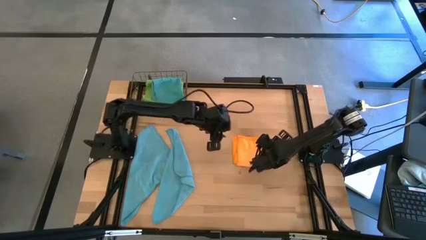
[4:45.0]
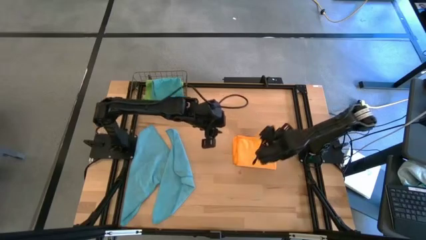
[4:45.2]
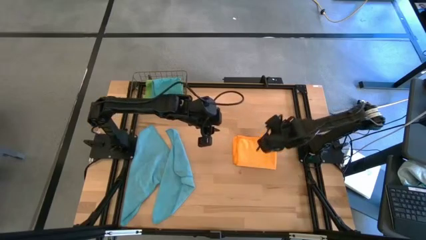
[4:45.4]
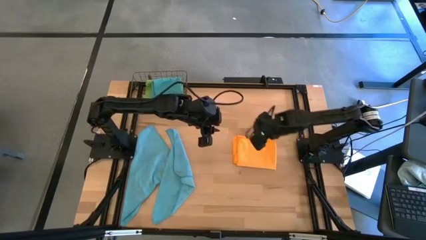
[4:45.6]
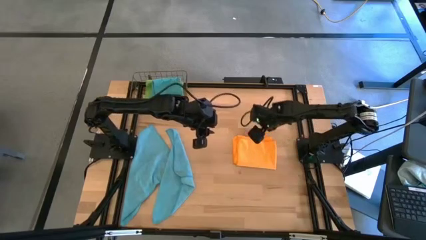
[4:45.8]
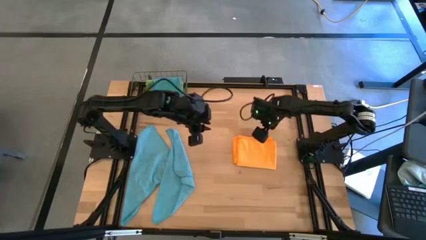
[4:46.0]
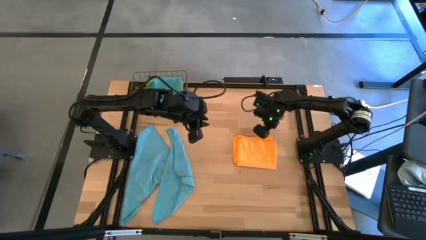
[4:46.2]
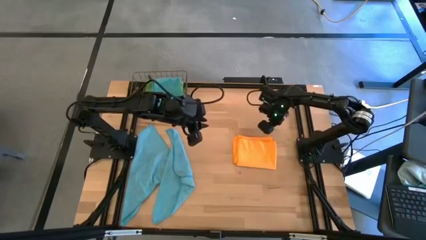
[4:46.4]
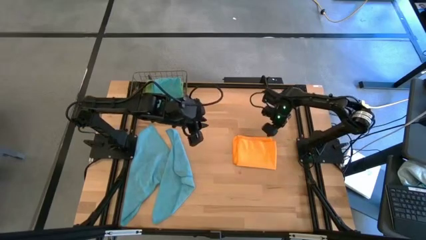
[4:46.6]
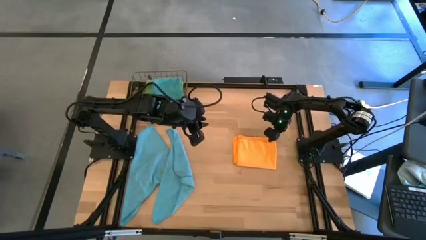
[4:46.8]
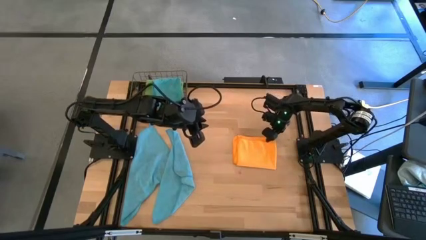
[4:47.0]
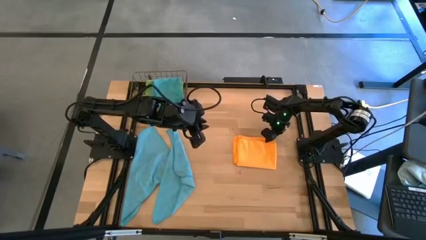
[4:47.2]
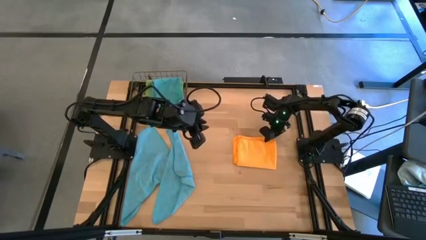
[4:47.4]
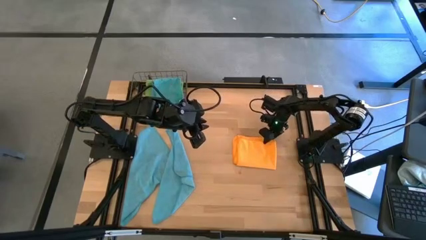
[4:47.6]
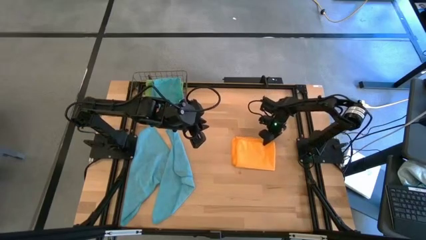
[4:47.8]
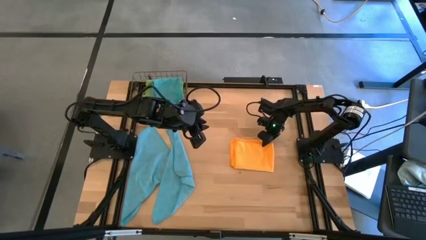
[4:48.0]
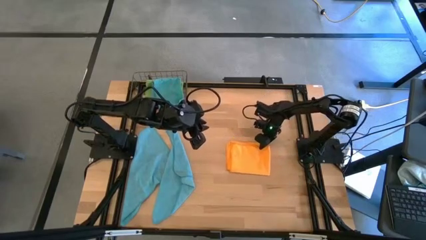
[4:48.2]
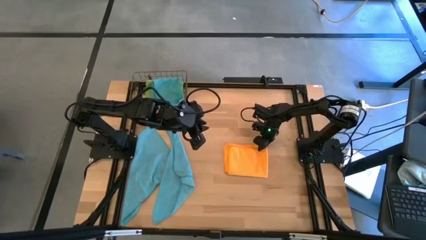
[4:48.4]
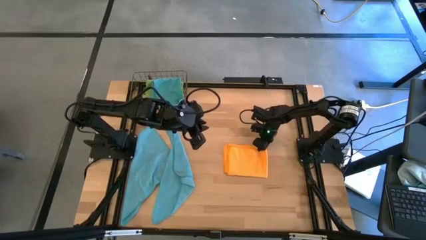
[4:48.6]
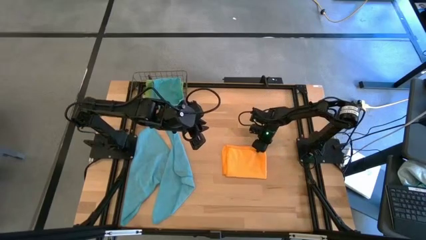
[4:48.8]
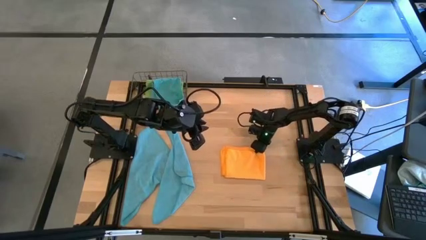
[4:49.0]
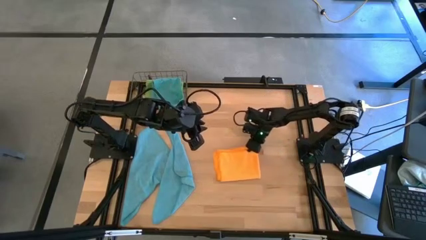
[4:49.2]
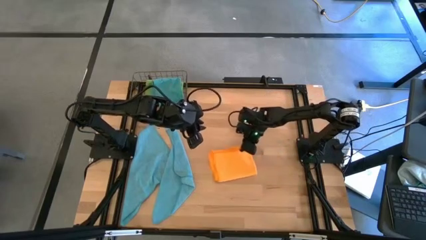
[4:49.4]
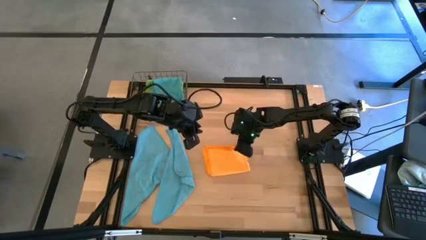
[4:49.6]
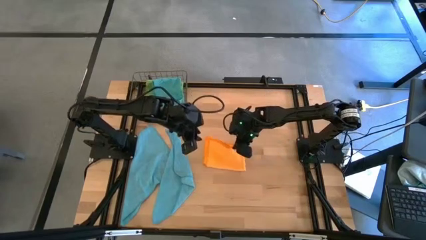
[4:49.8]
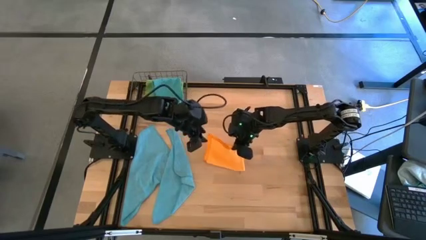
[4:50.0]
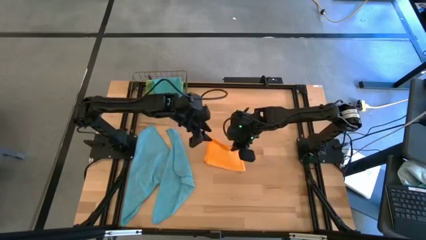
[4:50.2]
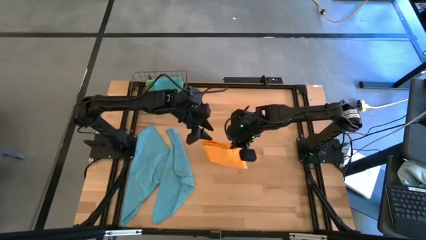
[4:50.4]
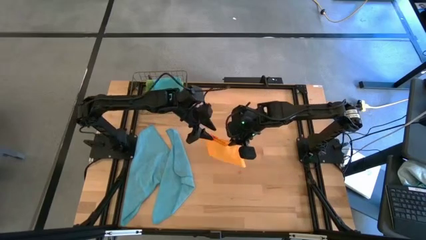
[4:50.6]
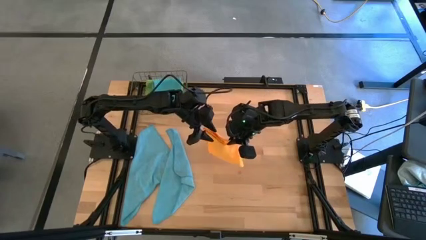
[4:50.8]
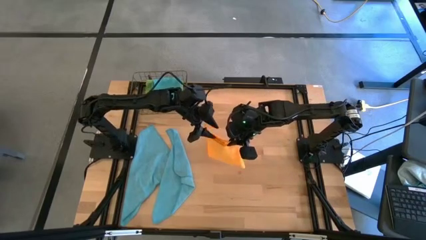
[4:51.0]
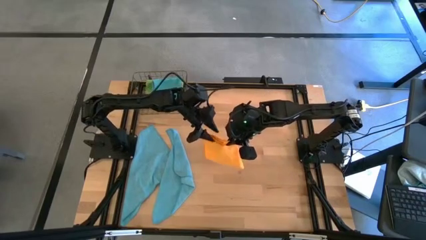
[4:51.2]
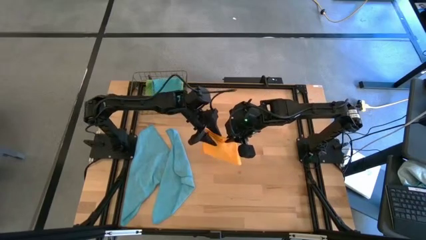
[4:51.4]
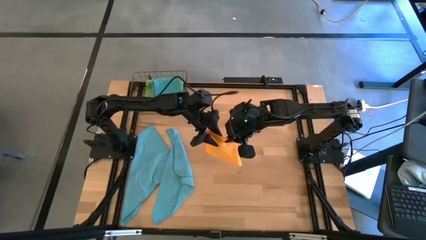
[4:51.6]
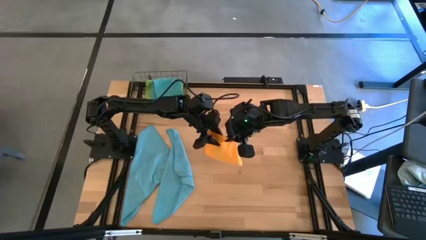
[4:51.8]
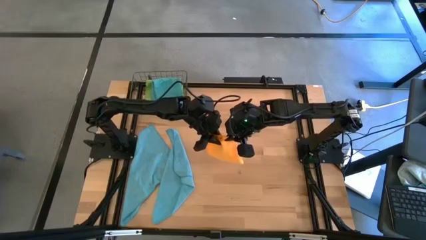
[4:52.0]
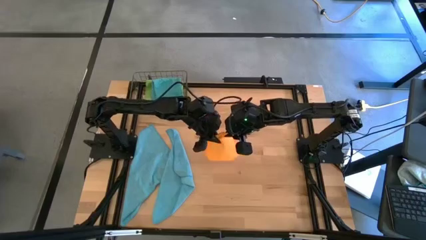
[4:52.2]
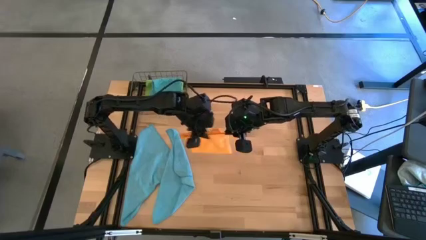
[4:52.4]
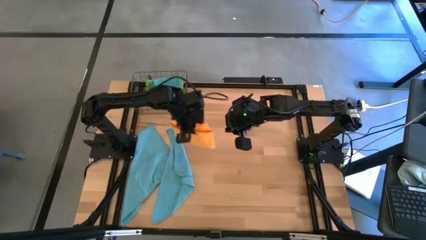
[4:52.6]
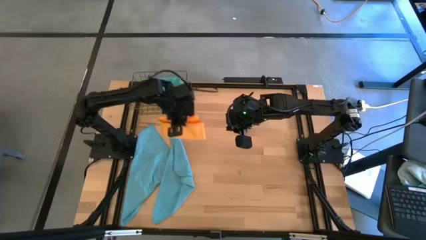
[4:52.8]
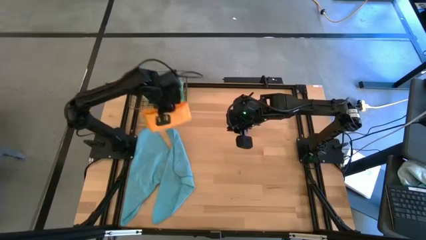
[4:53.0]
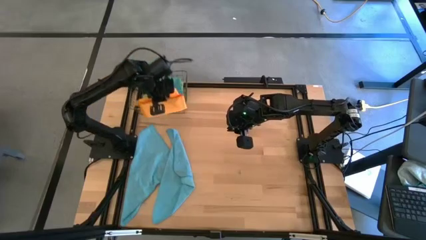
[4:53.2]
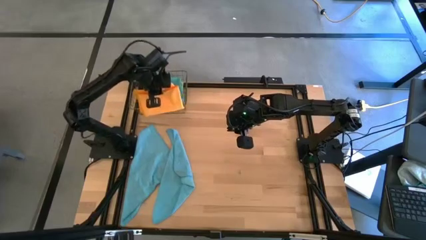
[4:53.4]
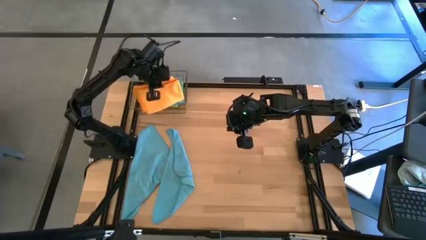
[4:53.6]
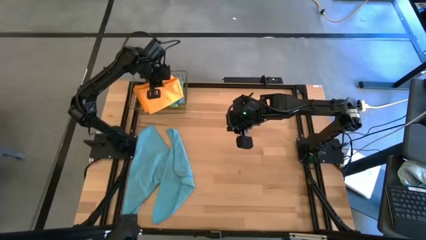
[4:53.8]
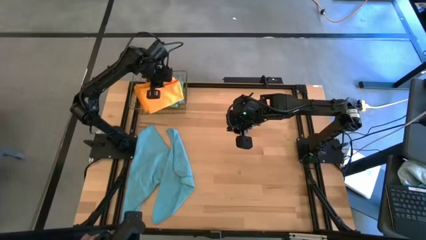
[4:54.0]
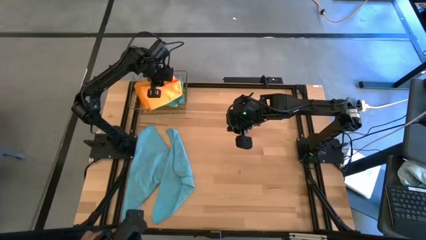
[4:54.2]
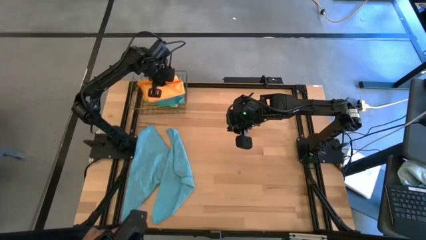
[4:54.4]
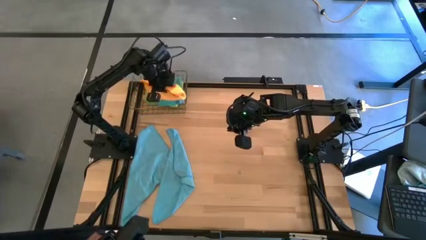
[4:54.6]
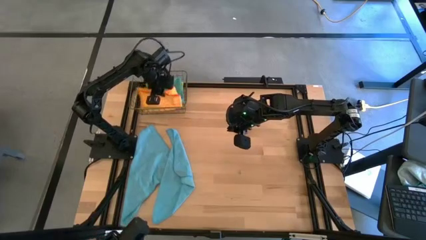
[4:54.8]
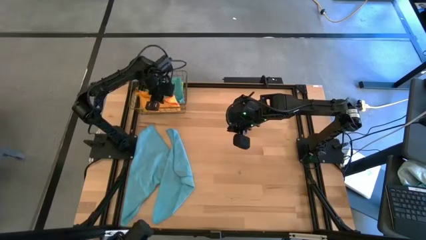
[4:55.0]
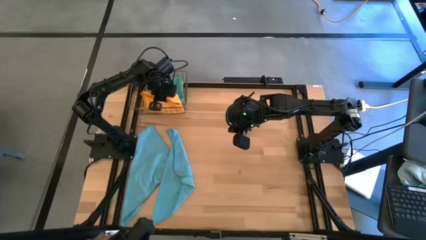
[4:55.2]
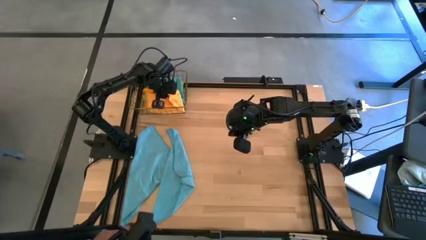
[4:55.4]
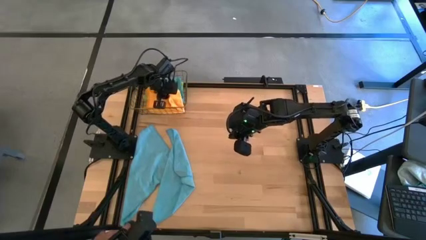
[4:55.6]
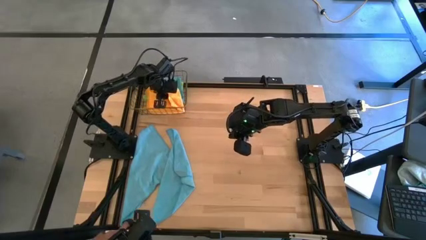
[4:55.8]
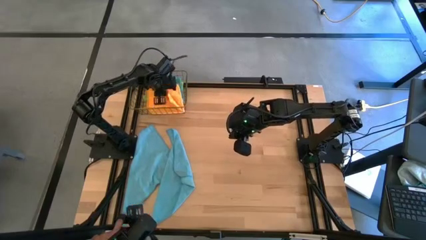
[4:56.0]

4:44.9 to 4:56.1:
Task: Fold microfiber towels
Put the folded orange microfiber cloth into the wire basket

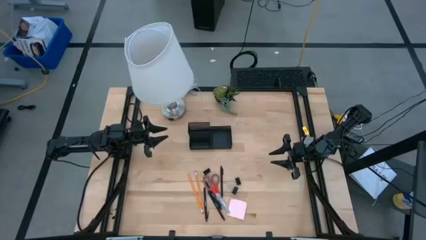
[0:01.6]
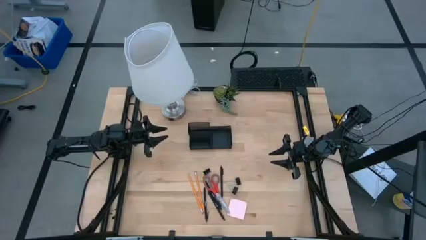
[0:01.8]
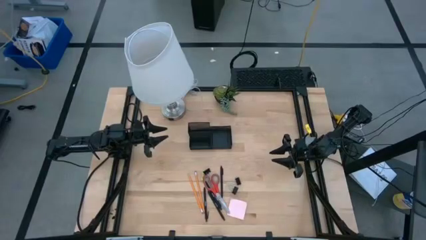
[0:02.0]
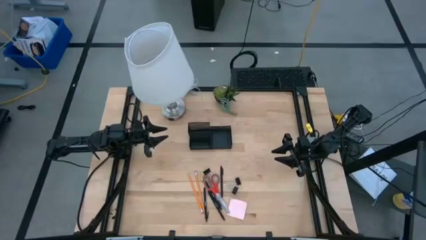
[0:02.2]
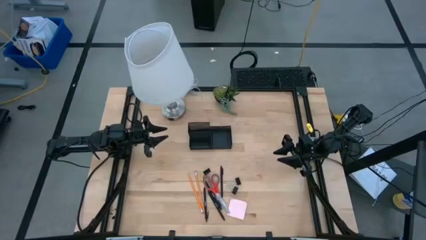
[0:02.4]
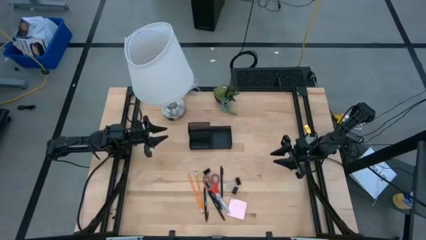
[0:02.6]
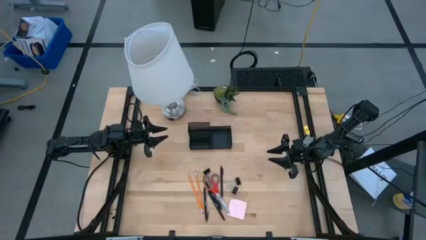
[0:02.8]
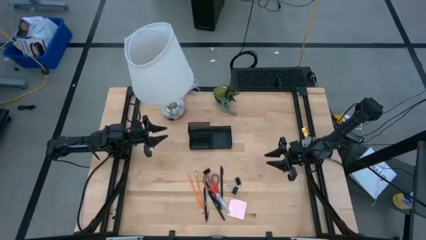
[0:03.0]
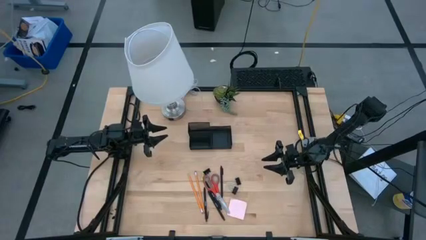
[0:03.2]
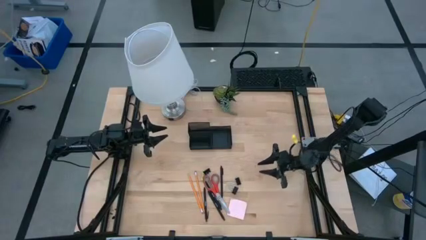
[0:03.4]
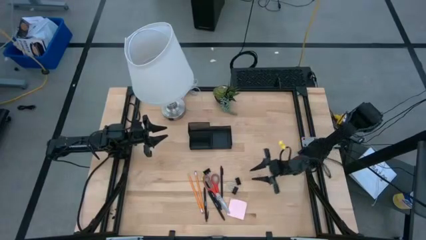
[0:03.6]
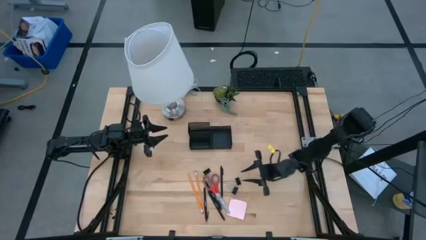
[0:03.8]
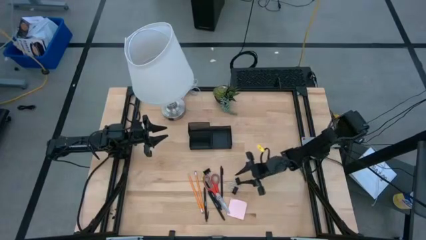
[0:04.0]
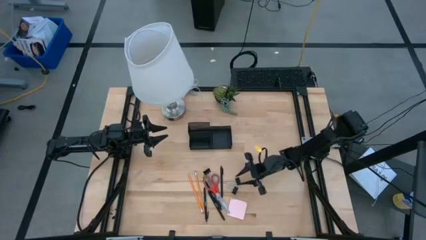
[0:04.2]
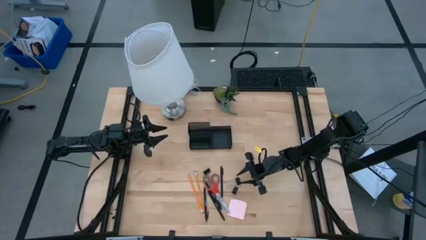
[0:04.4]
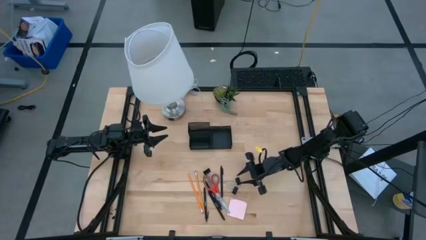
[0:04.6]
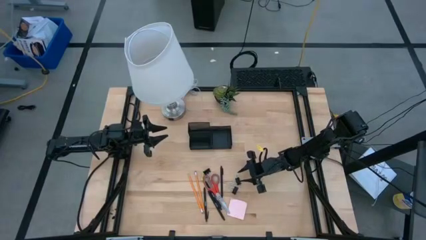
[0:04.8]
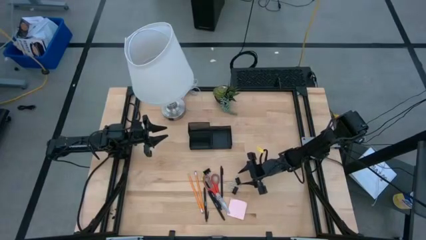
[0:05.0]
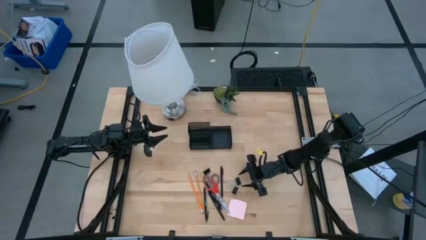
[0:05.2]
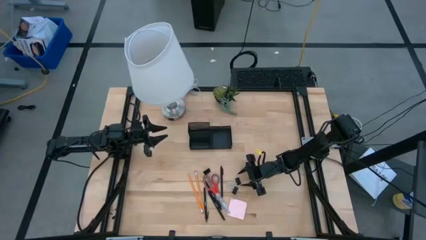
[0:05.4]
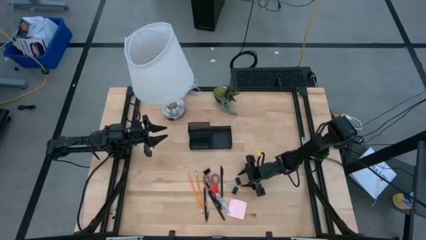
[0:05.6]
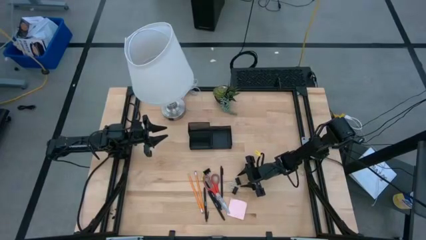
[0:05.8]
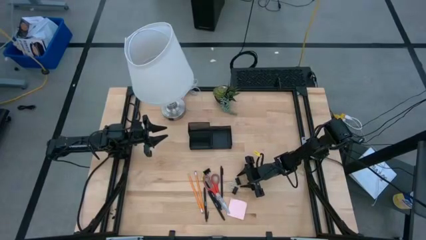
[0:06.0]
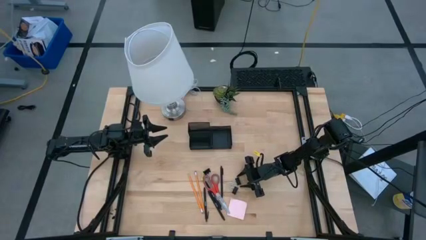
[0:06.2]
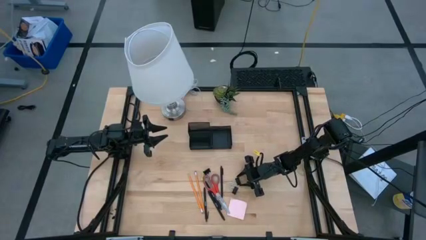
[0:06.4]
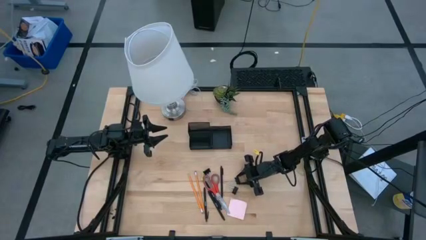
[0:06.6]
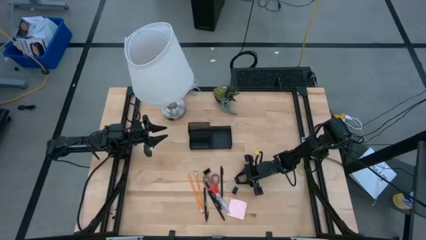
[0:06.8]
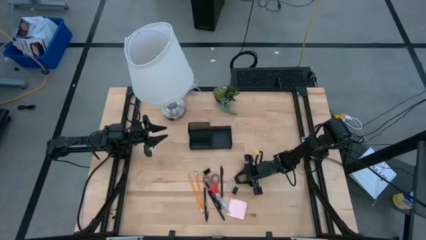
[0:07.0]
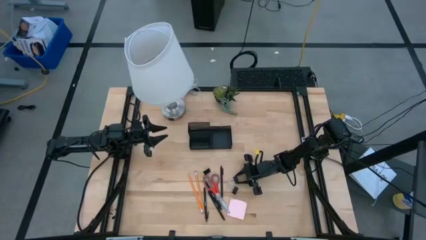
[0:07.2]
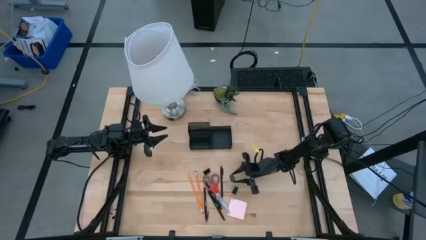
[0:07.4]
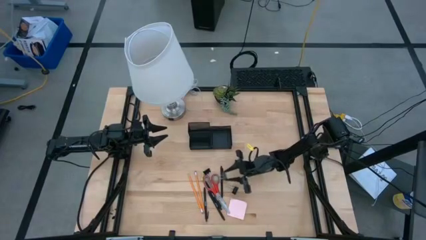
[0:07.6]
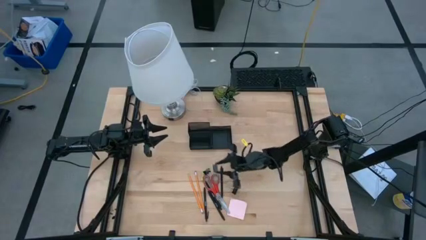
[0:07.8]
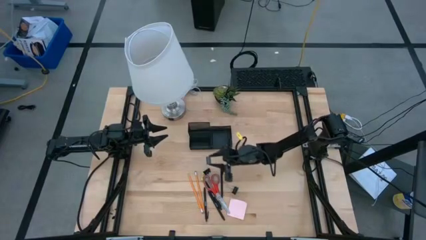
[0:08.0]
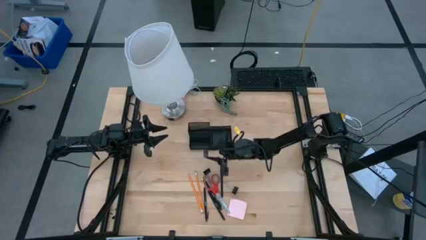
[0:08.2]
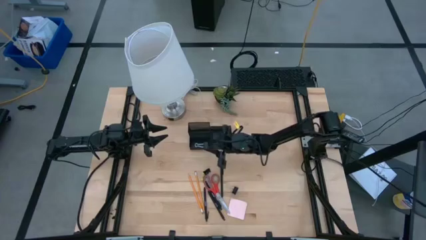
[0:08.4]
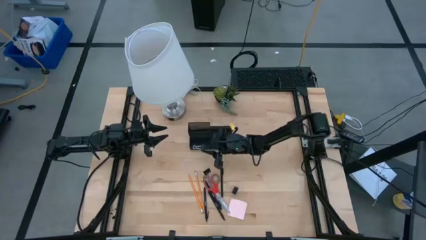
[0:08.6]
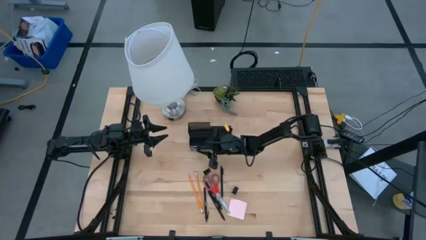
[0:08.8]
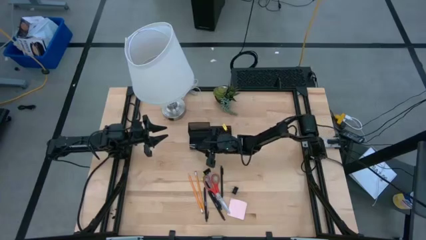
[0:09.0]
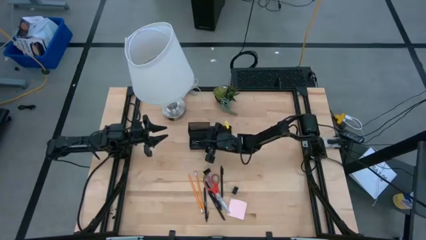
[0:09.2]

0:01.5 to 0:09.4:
Task: Pick and place office supplies into organizer
Put the black middle binder clip into the black desk organizer
